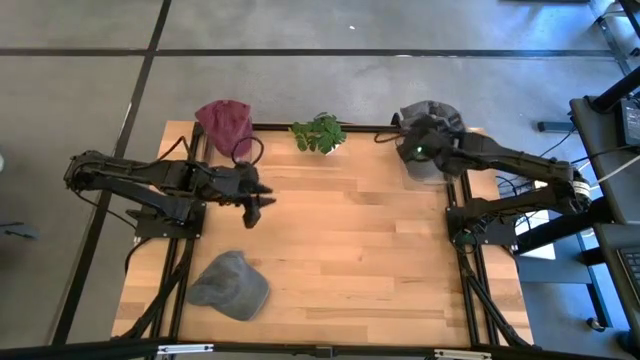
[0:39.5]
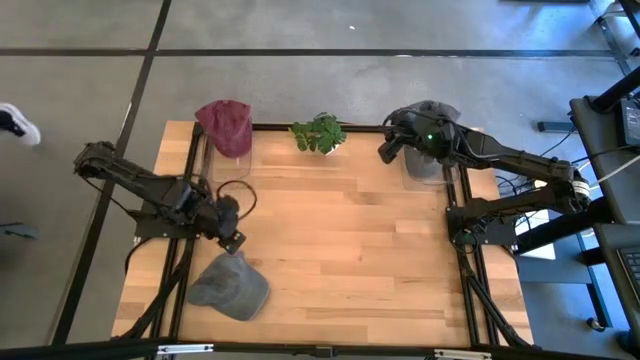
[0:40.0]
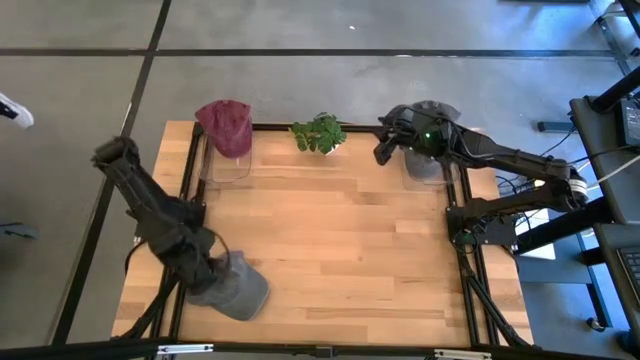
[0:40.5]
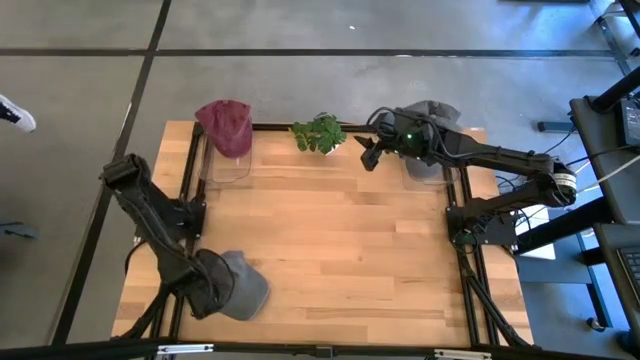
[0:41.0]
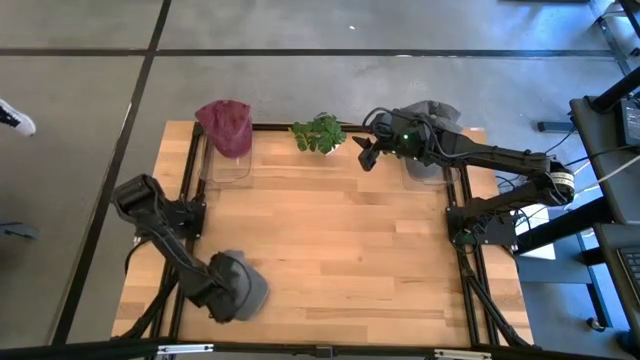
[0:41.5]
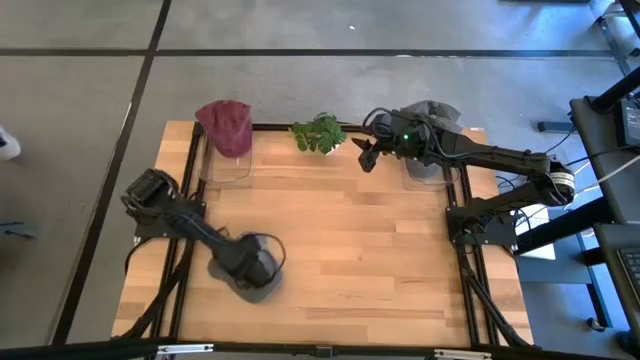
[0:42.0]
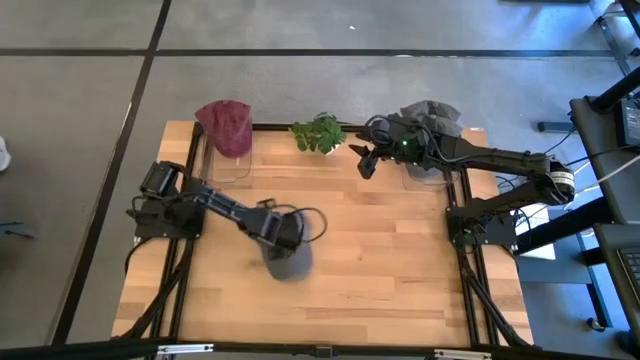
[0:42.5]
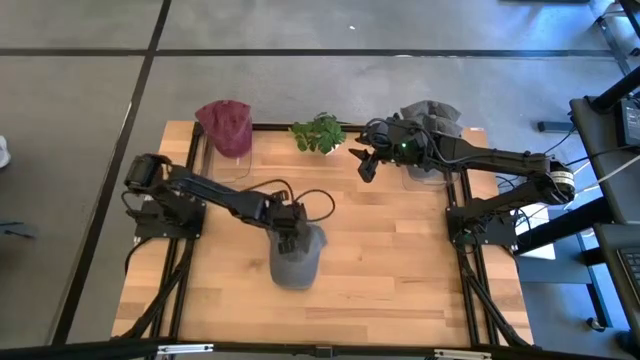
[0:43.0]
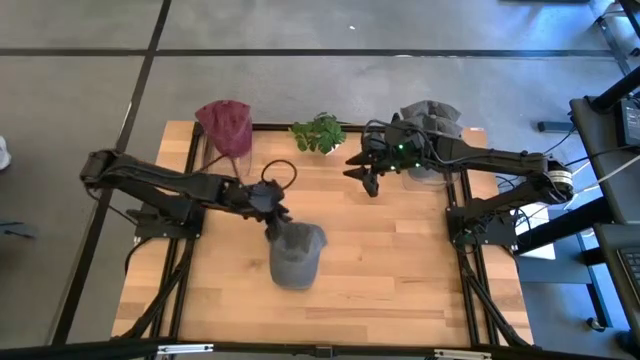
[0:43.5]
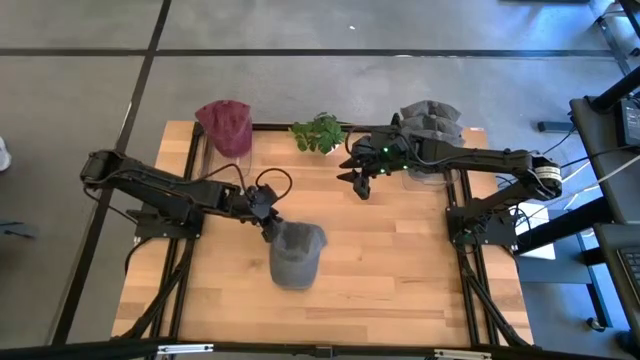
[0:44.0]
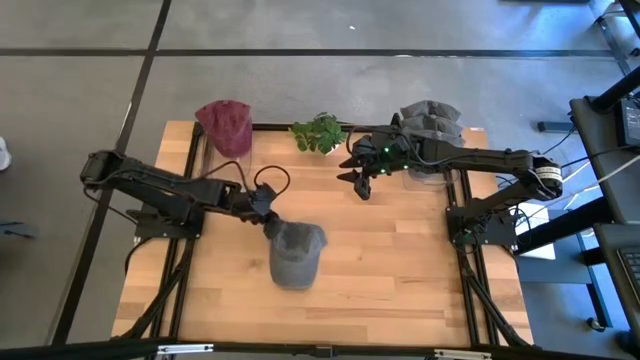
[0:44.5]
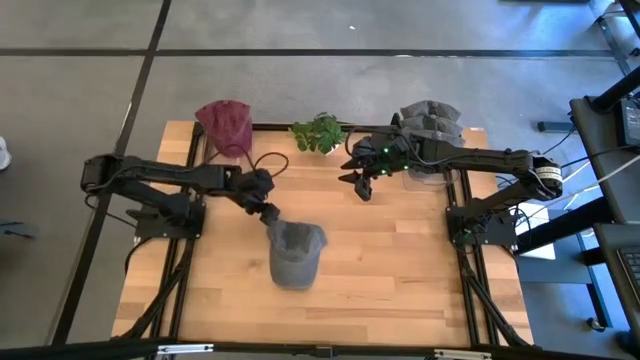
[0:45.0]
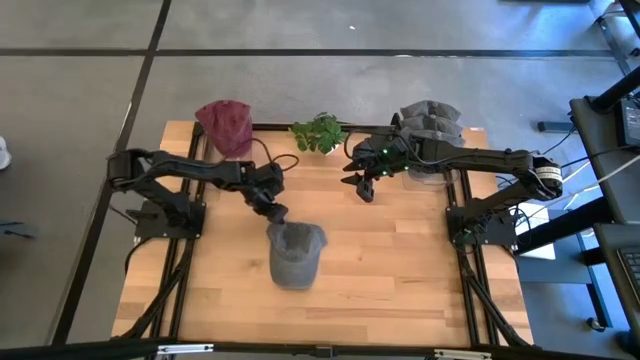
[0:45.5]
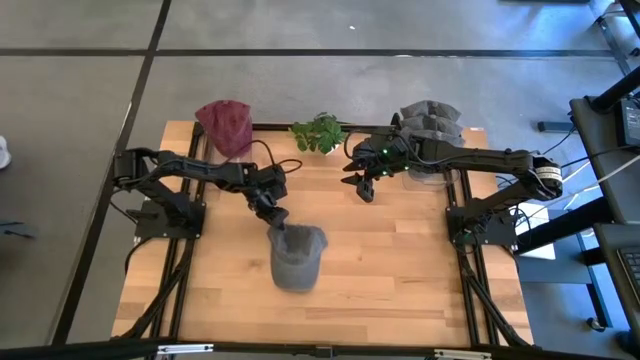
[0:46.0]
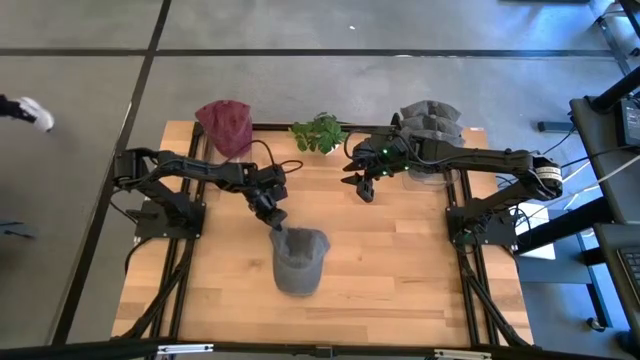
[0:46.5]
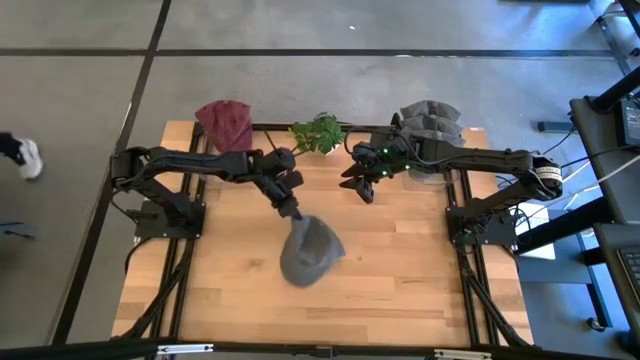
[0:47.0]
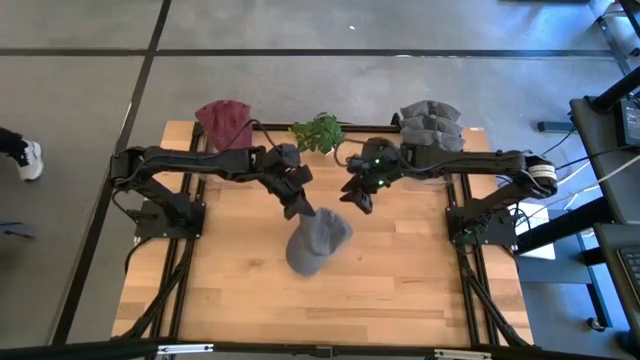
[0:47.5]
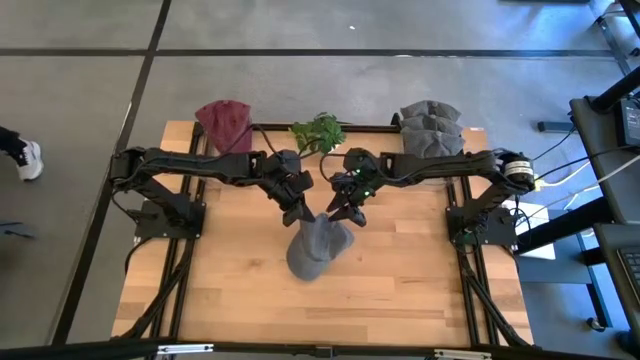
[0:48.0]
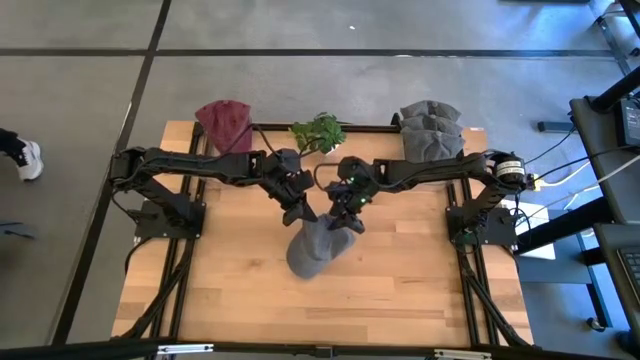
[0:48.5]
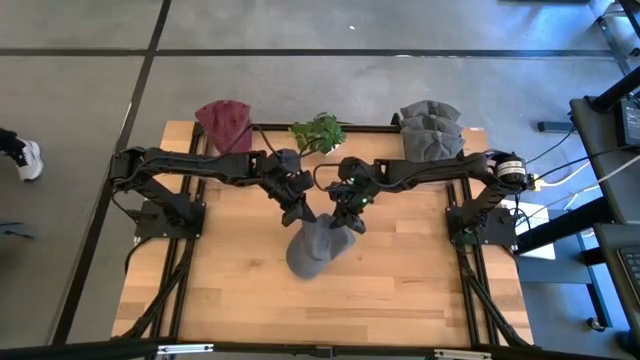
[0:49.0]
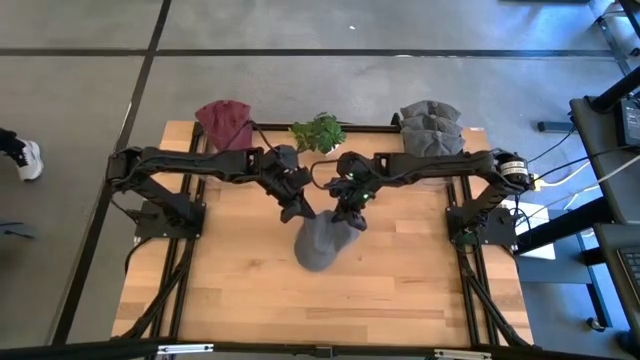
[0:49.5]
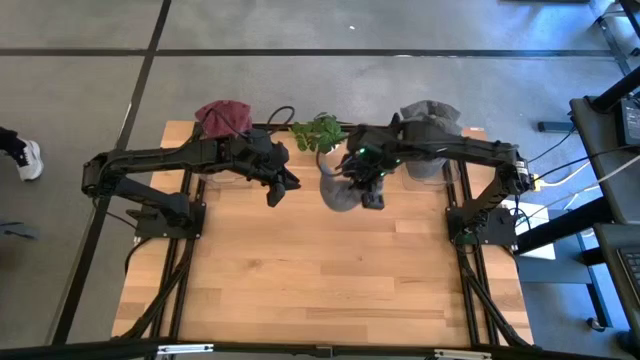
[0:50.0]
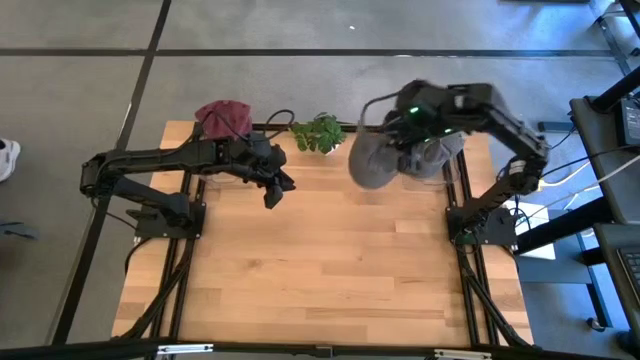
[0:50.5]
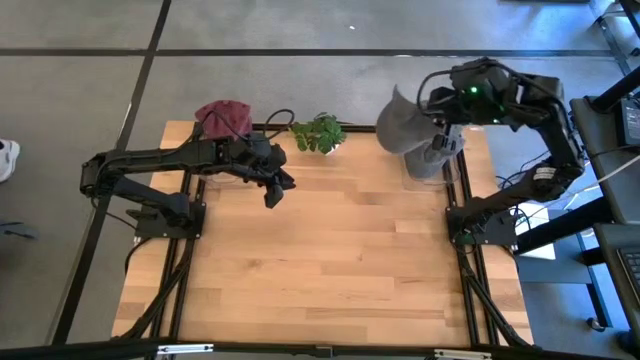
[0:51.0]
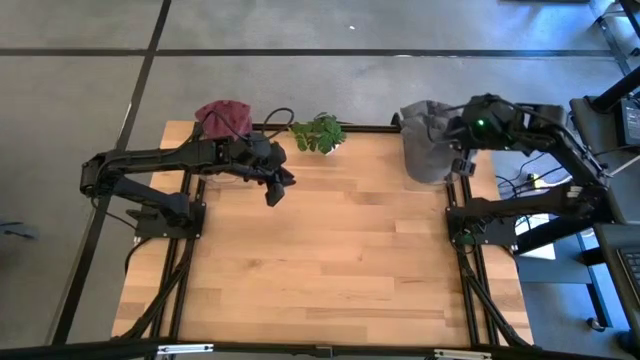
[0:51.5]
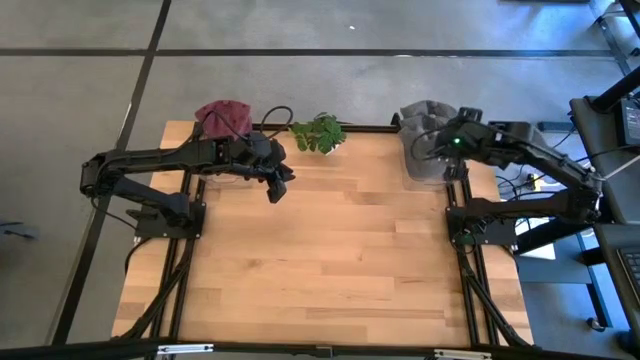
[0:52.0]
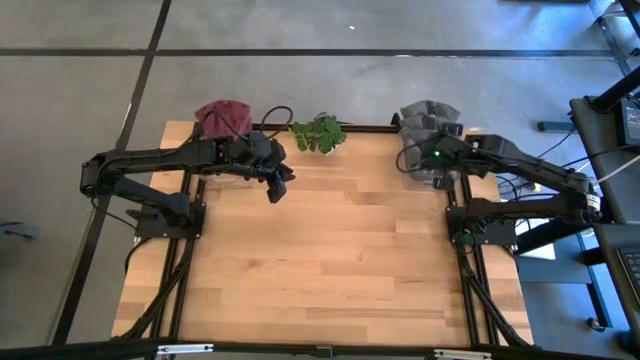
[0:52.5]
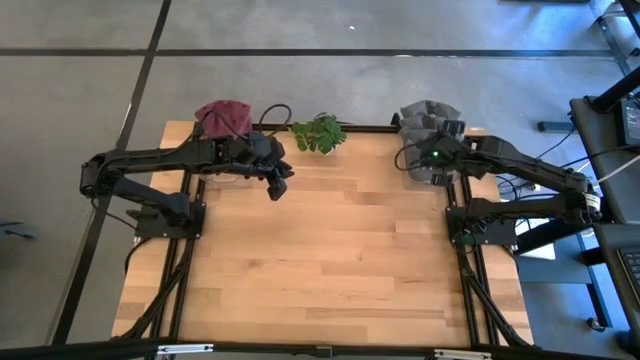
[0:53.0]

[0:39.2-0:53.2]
Task: Pick & Place hat
Put the gray cap into the right transparent bin

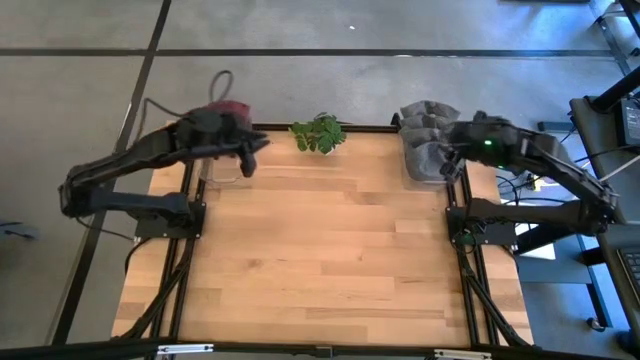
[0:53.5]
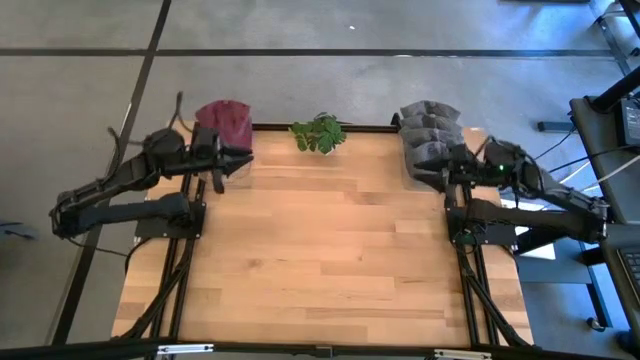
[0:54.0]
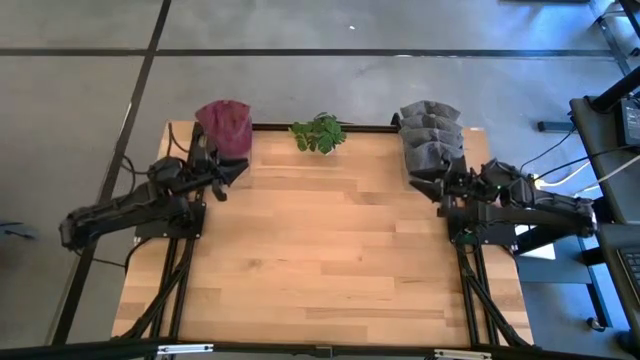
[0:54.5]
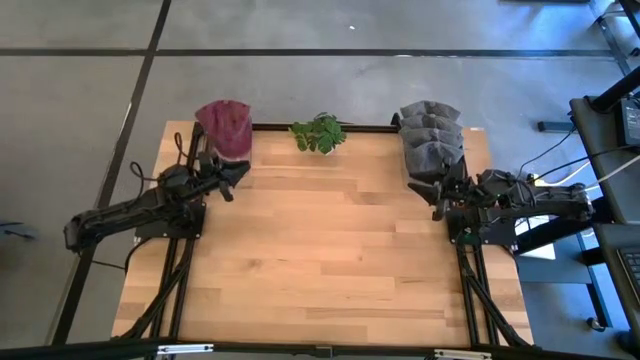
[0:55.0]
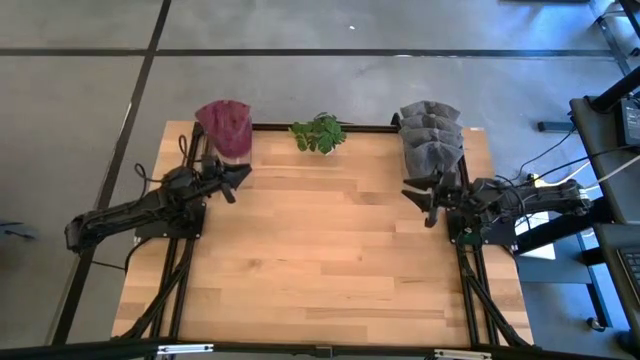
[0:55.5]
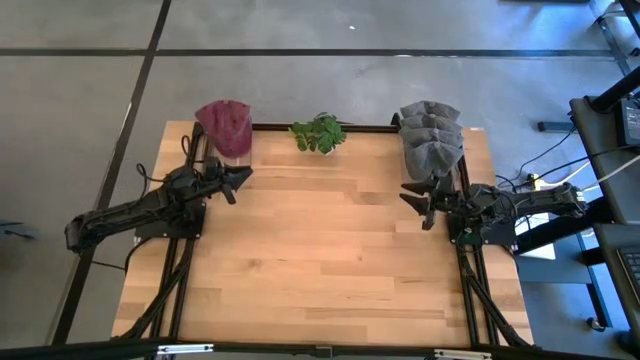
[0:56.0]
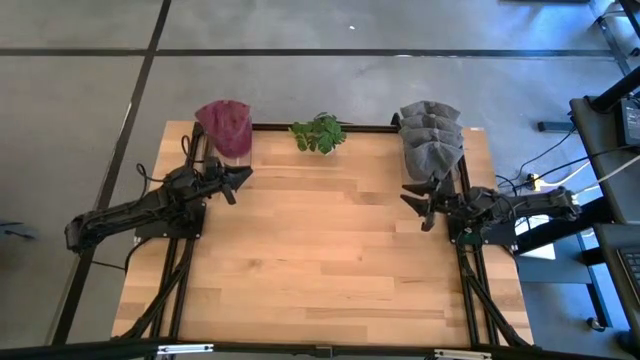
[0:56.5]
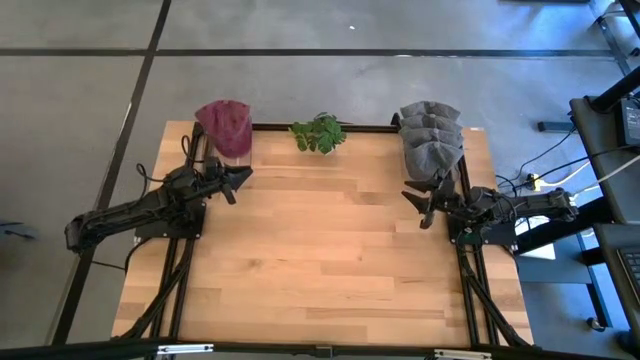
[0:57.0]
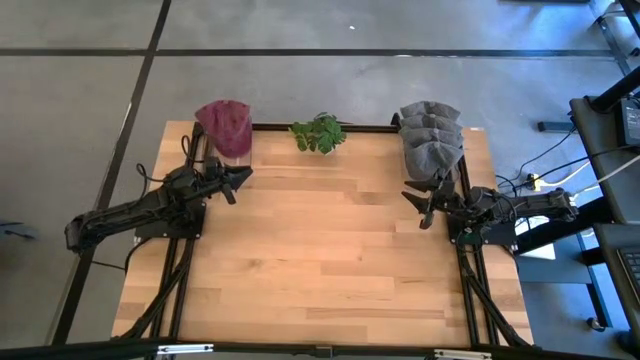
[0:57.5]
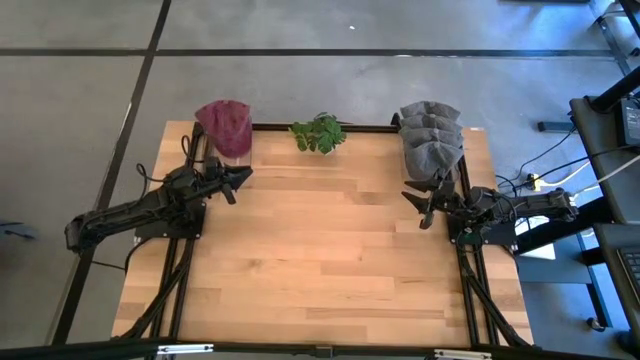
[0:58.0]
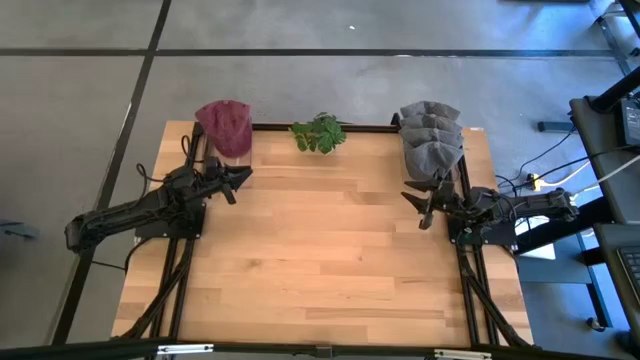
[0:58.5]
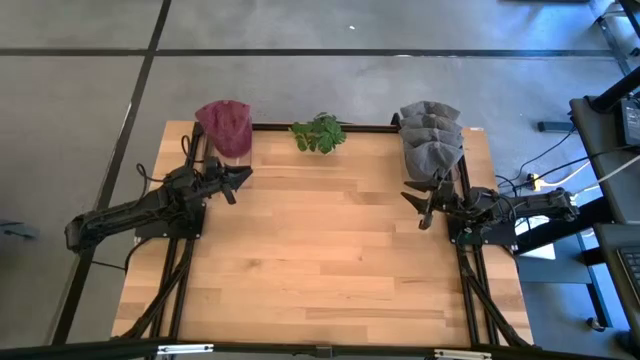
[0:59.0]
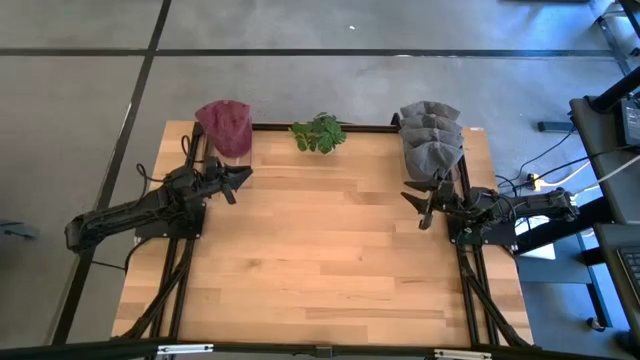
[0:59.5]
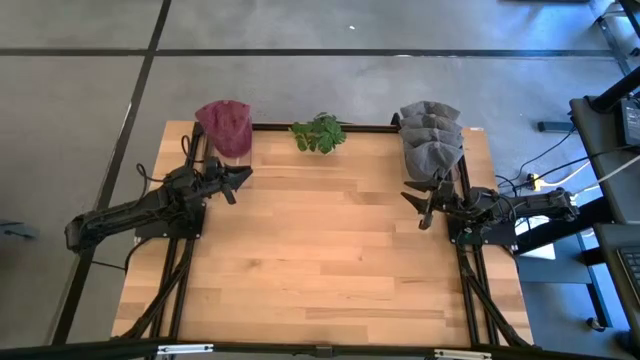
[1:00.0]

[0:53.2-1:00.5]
Return to Home Position
